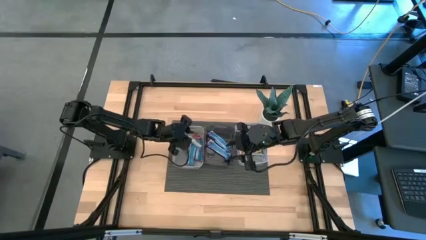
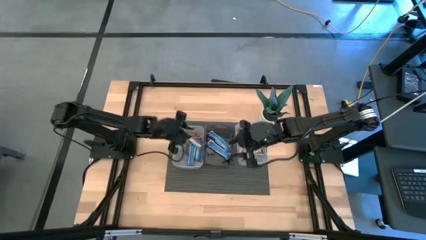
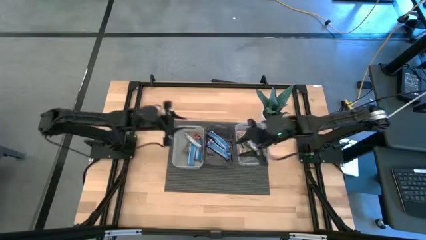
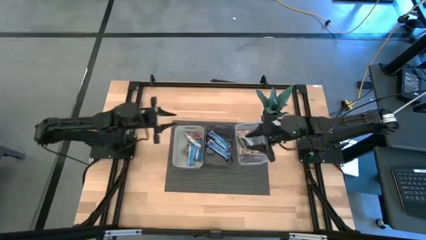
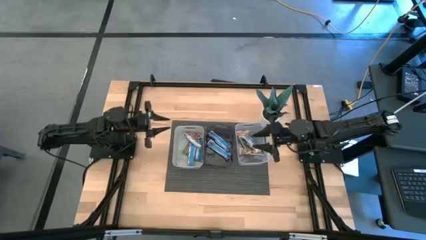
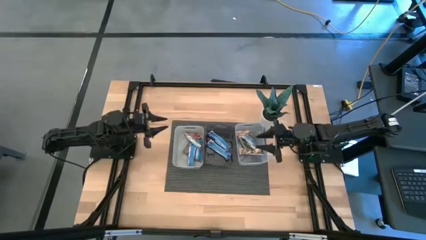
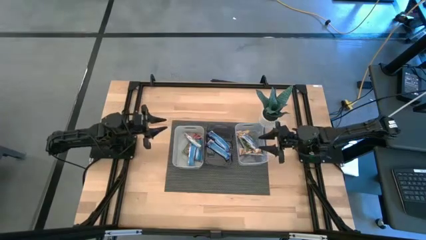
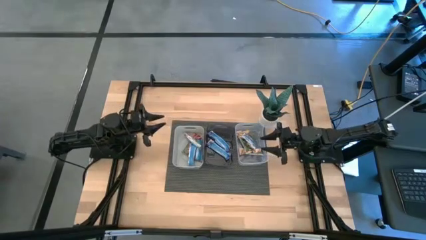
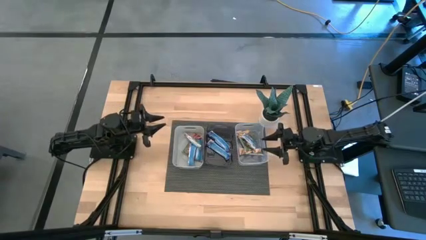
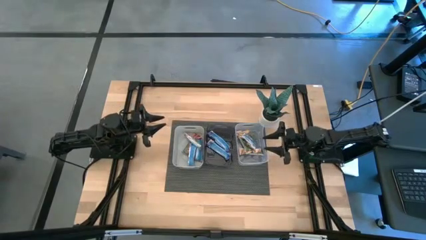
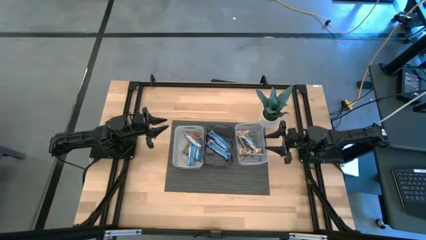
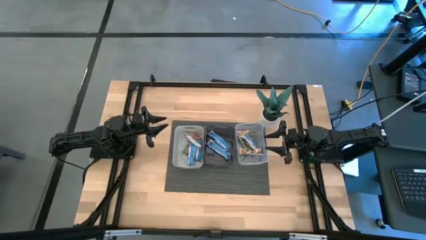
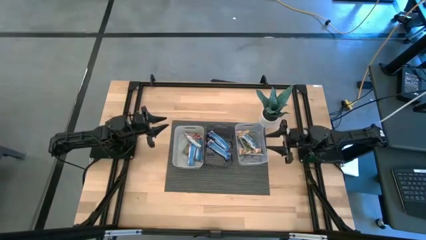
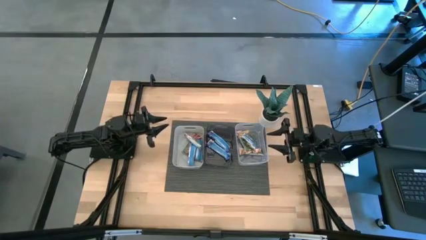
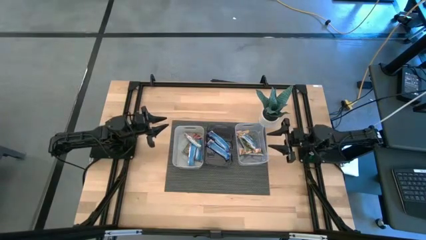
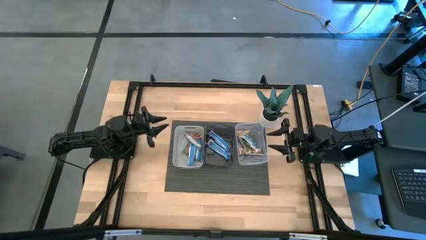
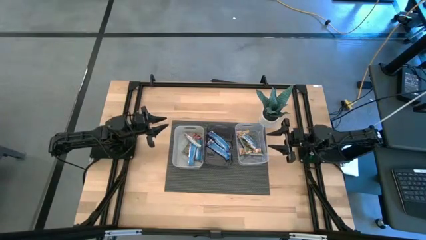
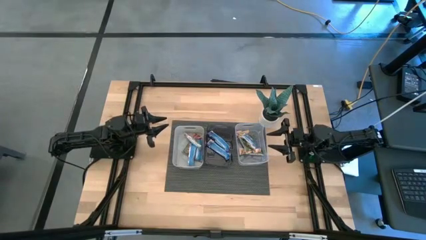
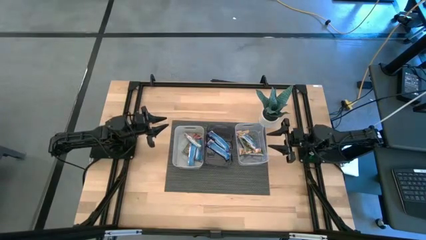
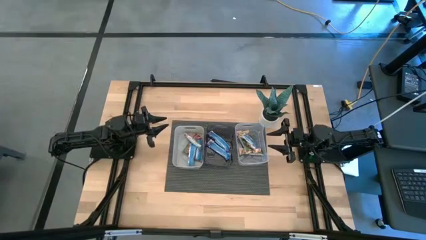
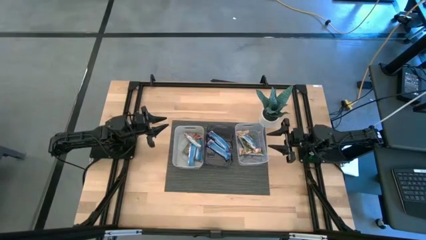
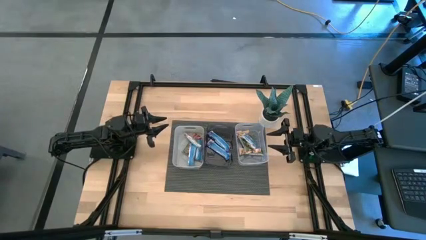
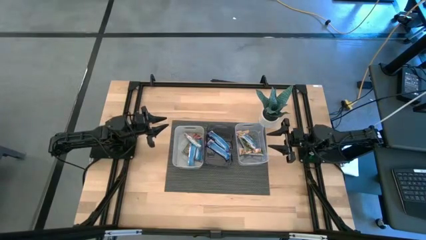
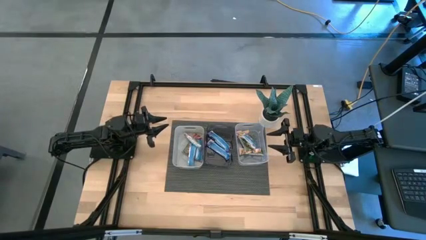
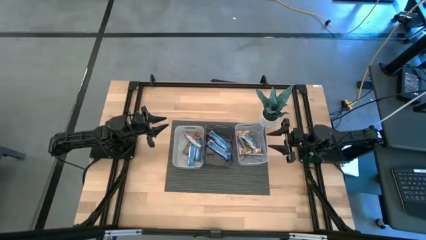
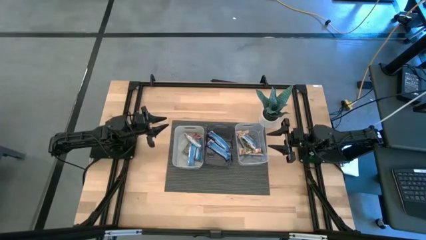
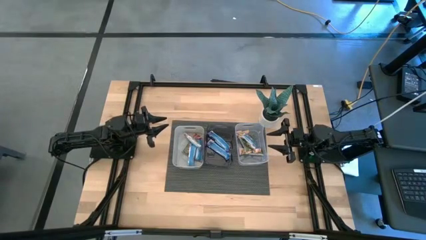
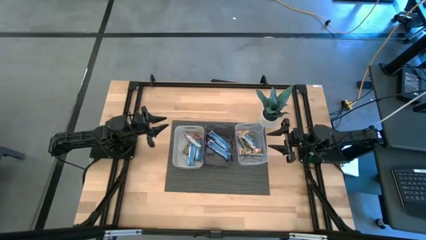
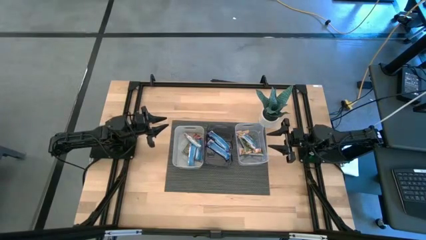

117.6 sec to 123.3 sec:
Task: Pick and place Granola Bars by type
Return to Home Position
